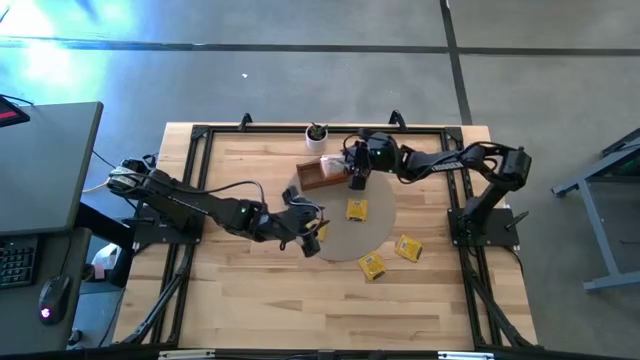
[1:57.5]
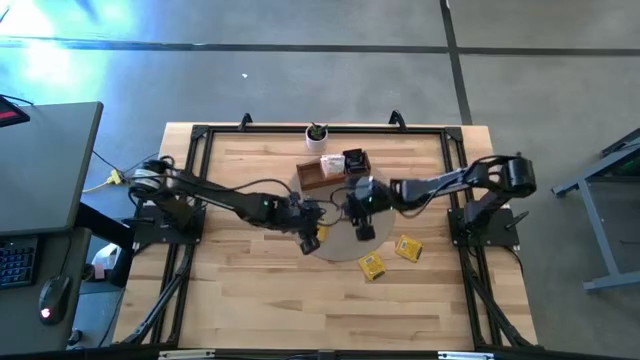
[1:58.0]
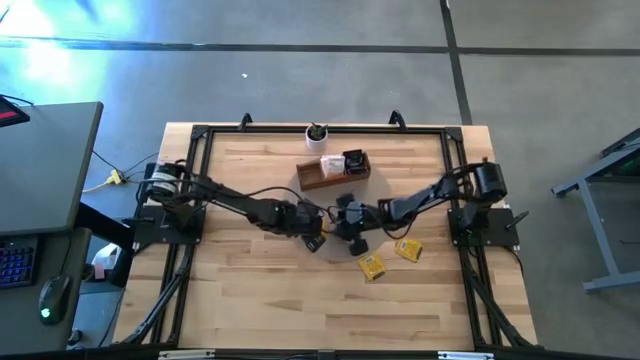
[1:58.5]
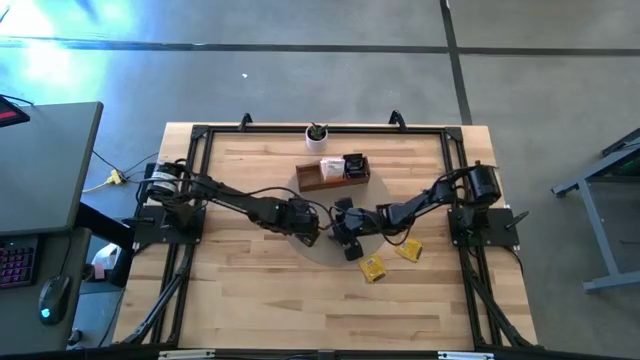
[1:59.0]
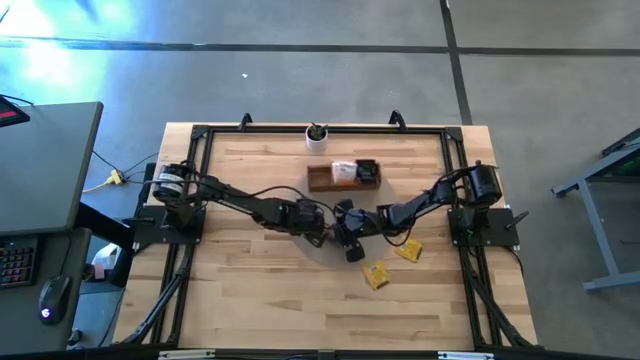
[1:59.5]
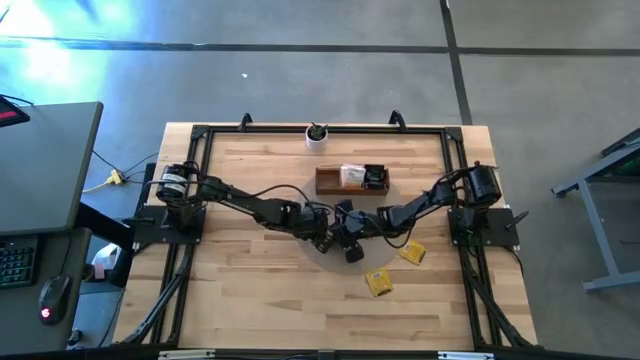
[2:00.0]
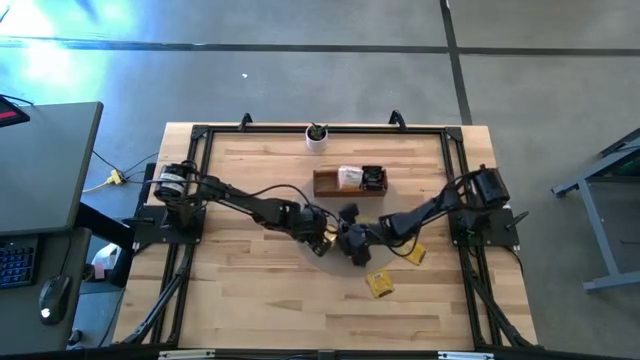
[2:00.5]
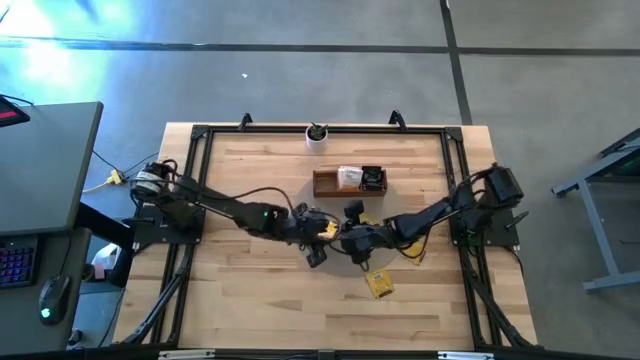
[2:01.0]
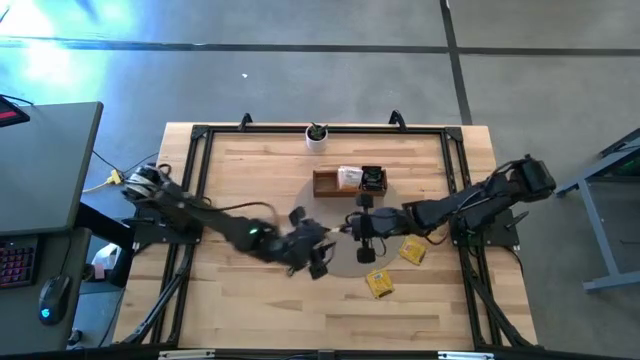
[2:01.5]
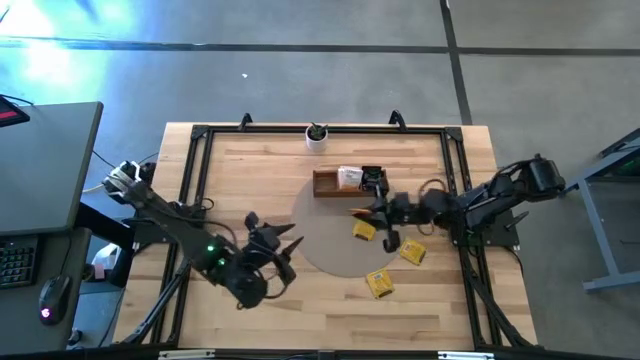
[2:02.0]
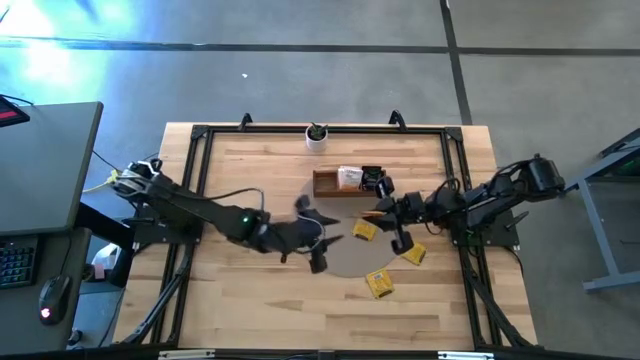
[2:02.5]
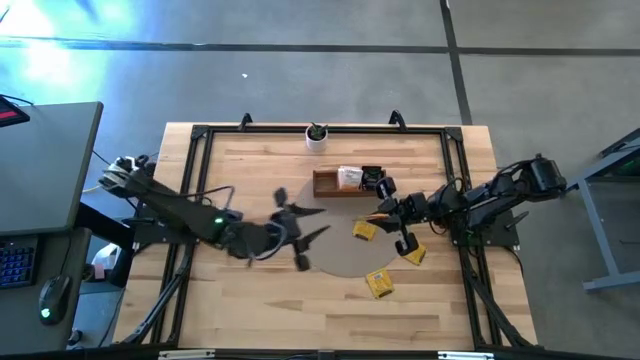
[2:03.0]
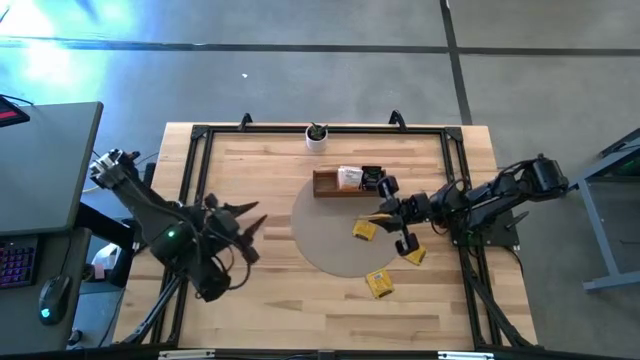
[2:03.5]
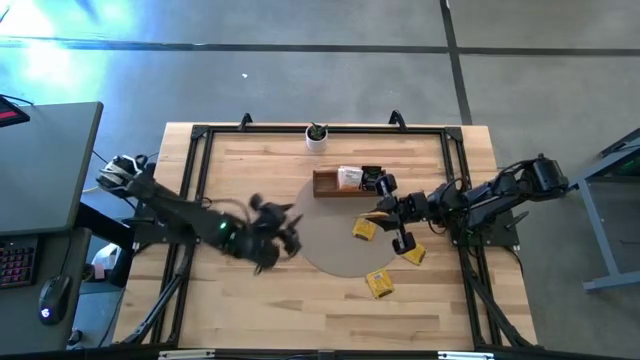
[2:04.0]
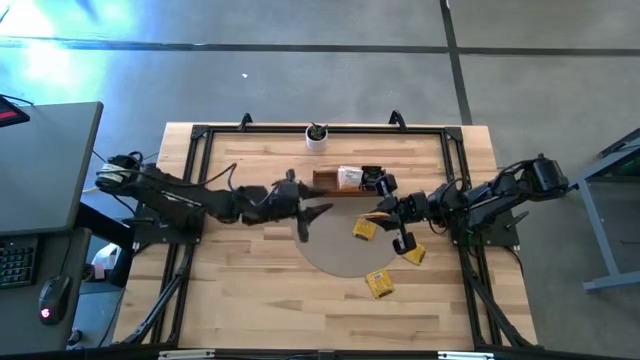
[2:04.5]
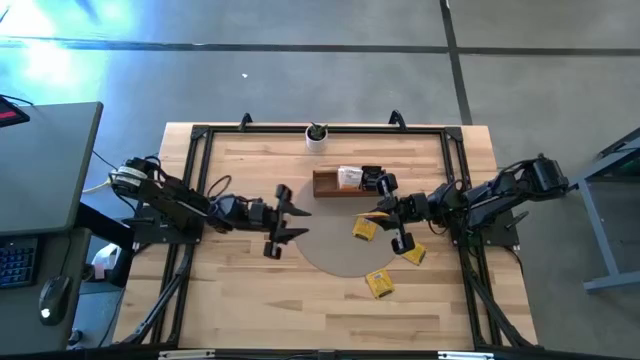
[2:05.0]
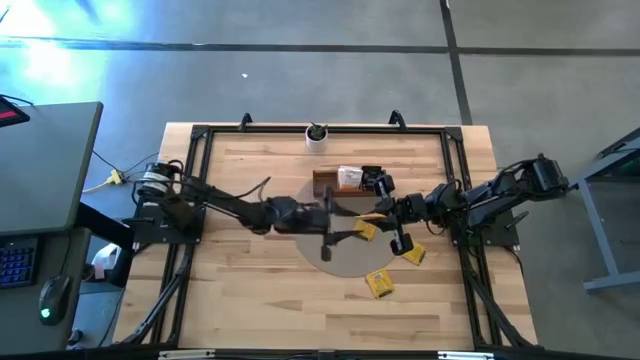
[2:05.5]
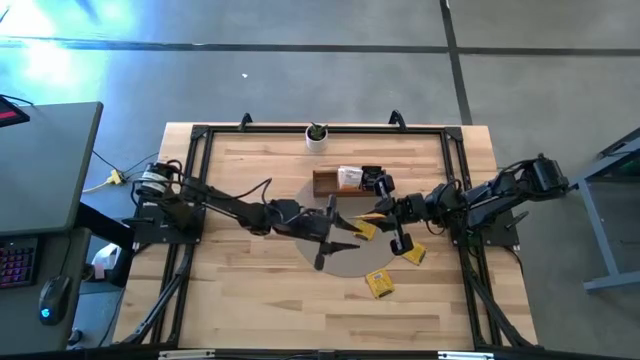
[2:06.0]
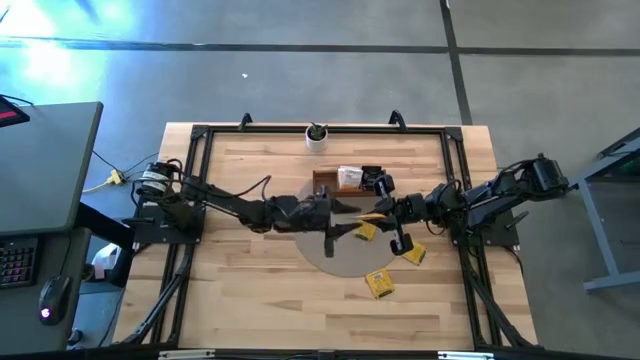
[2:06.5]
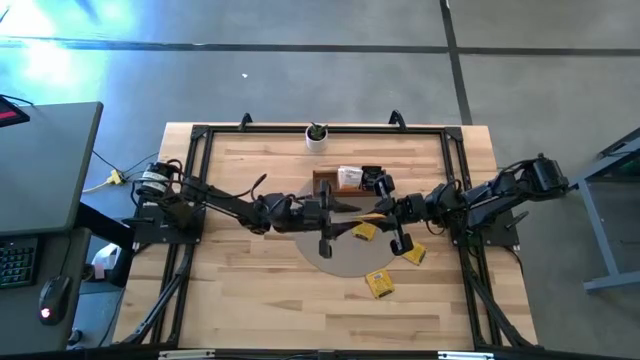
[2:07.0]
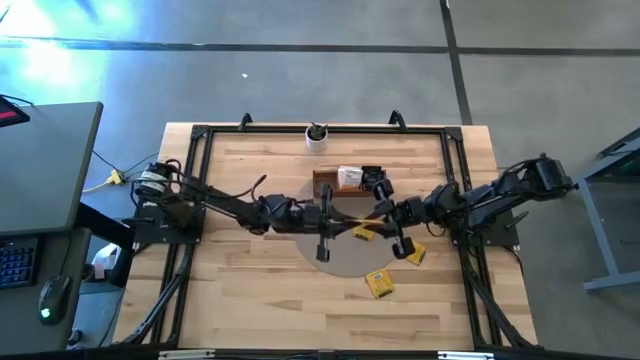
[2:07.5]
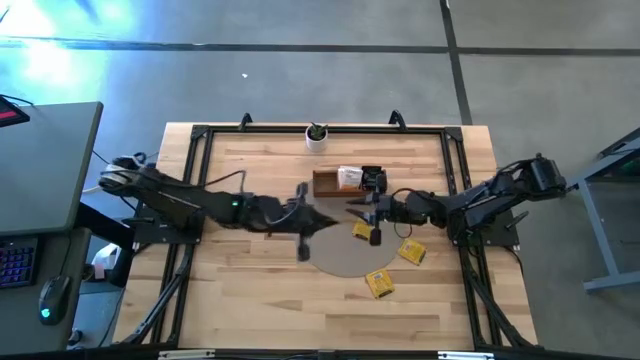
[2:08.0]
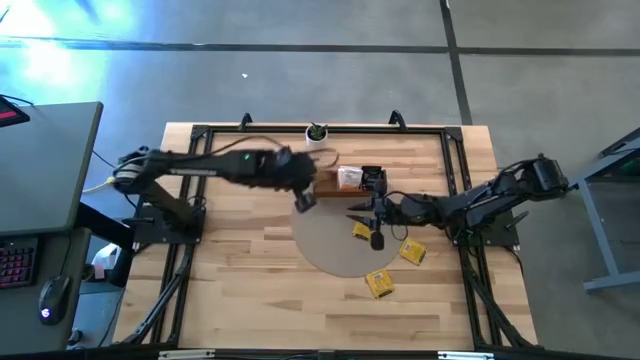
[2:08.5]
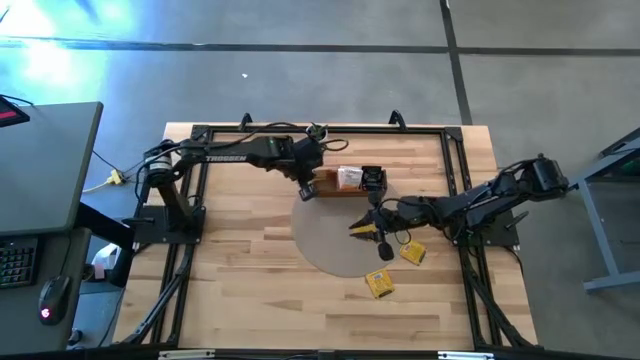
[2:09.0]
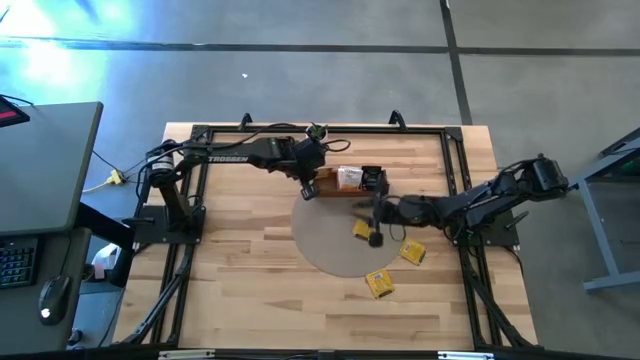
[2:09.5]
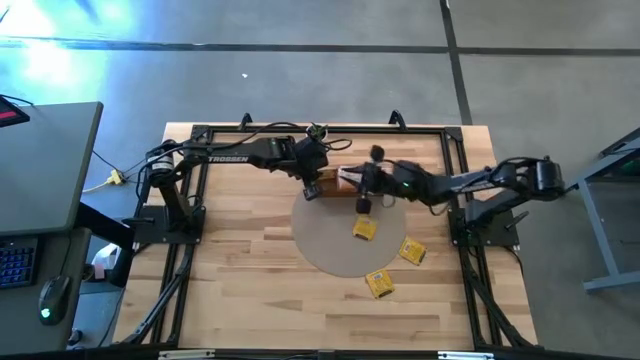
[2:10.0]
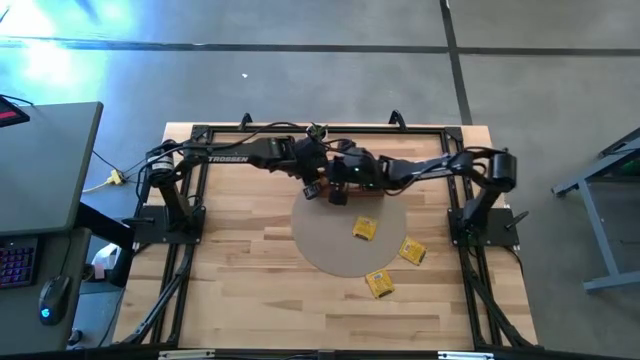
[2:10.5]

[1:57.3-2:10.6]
Task: Pick & Place Tea
Put the yellow tea bag into the left section of the wooden organizer

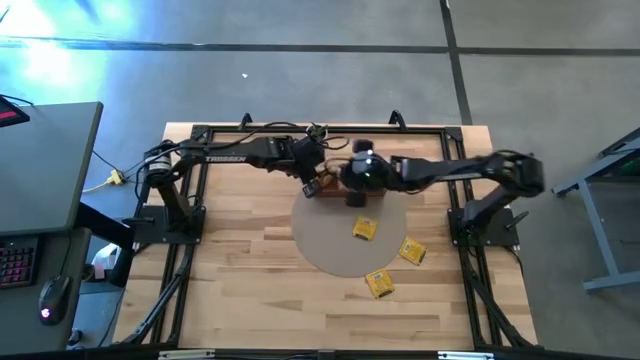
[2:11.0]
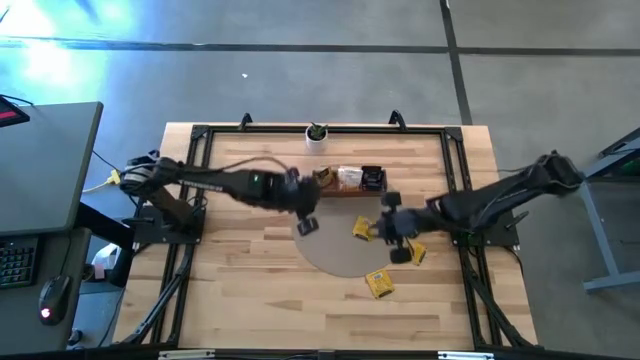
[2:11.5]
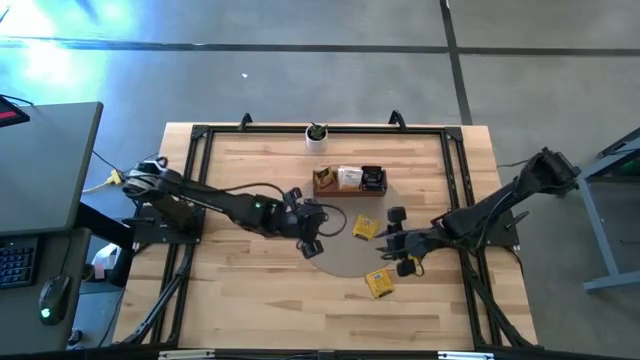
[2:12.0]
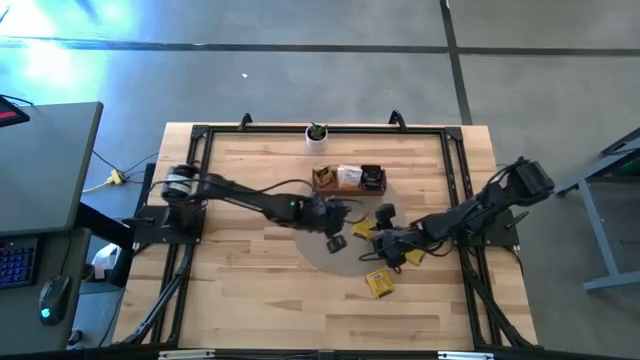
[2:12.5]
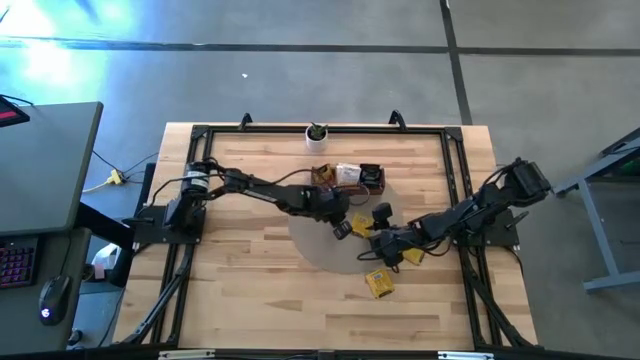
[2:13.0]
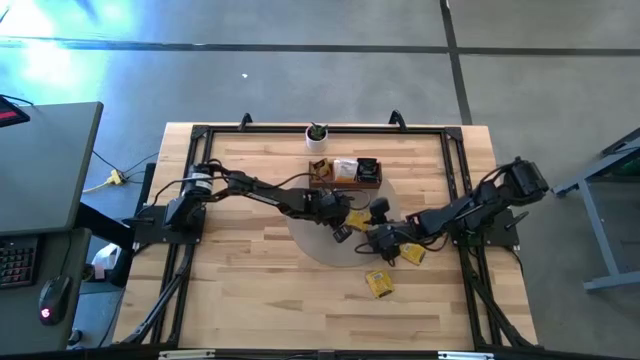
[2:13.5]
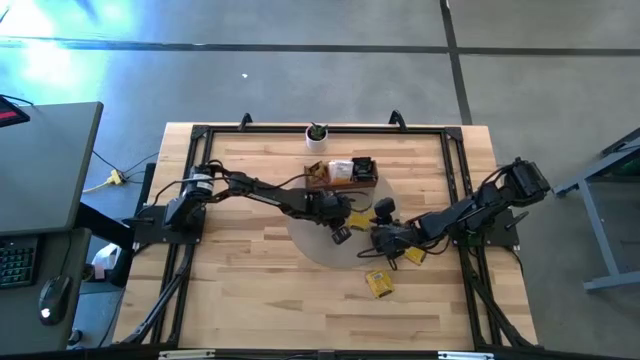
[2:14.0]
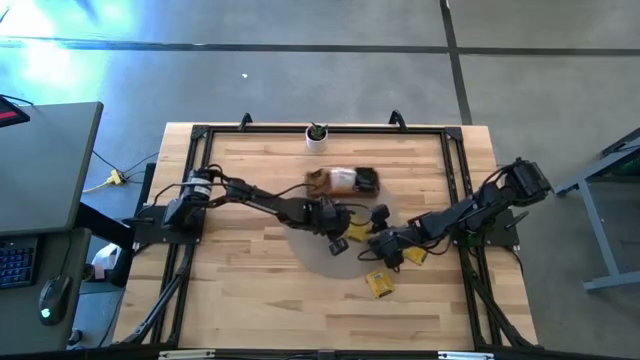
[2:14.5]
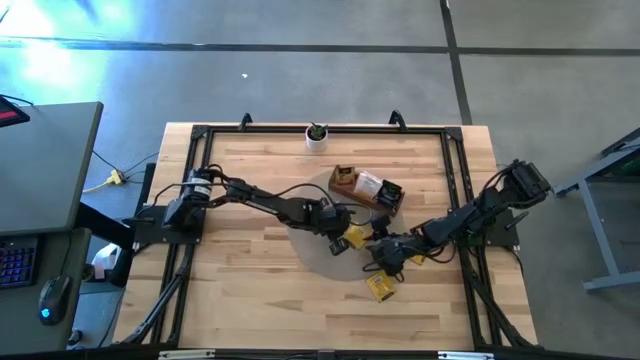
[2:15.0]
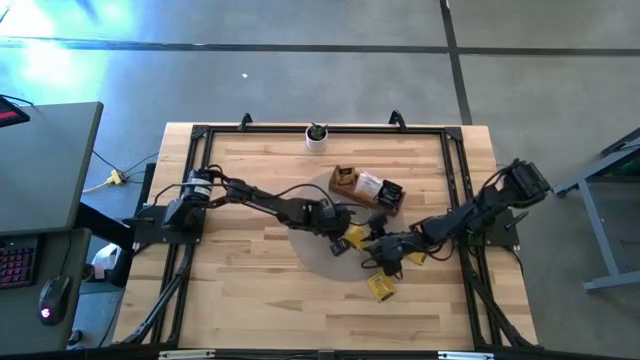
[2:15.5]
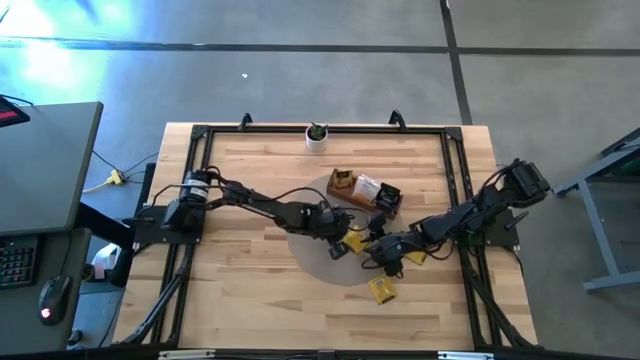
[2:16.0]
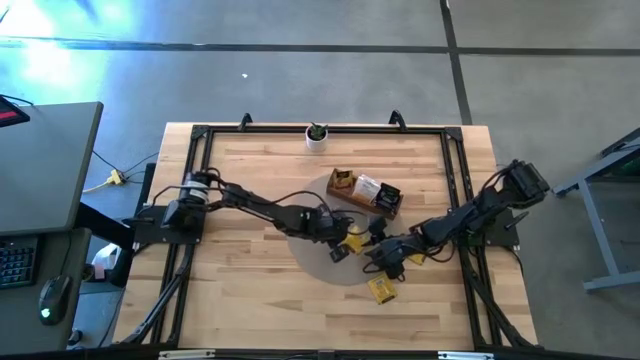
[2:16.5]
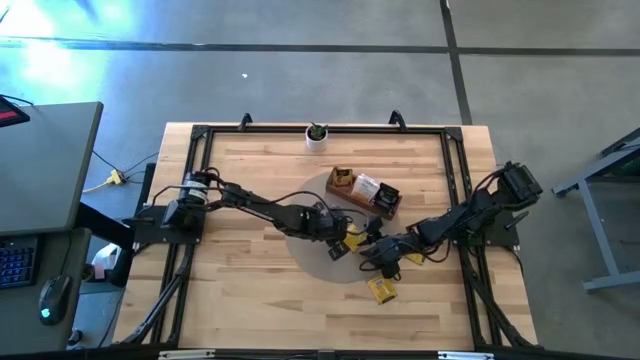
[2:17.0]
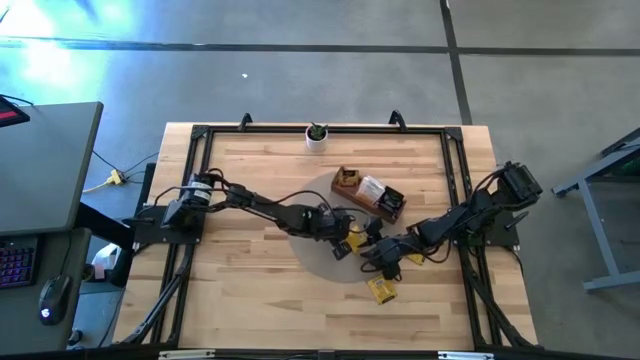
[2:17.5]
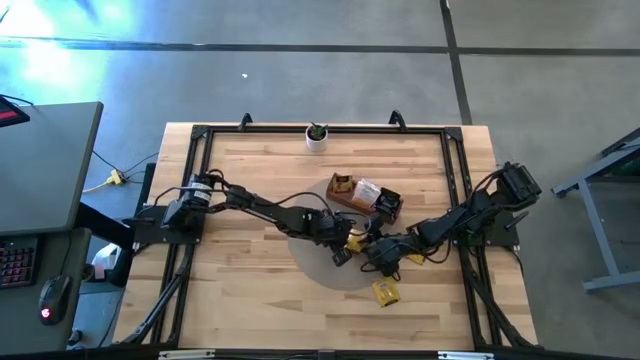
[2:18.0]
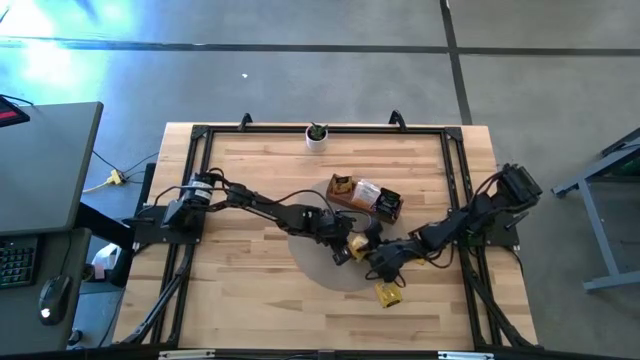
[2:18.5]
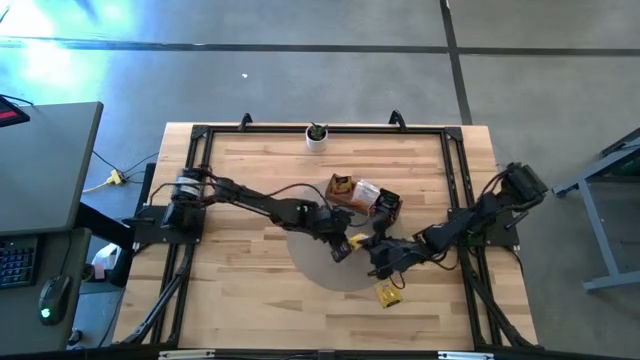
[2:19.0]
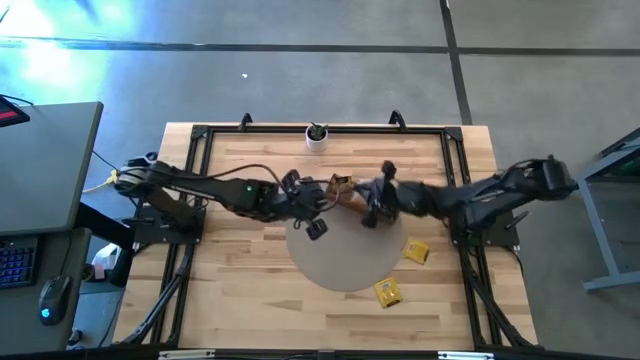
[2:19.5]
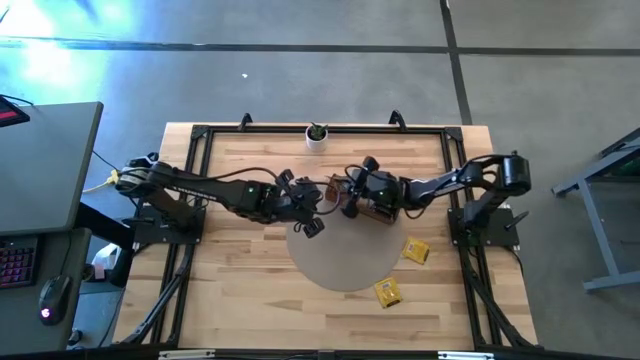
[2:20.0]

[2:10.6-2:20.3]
Put the top yellow tea bag into the left section of the wooden organizer
